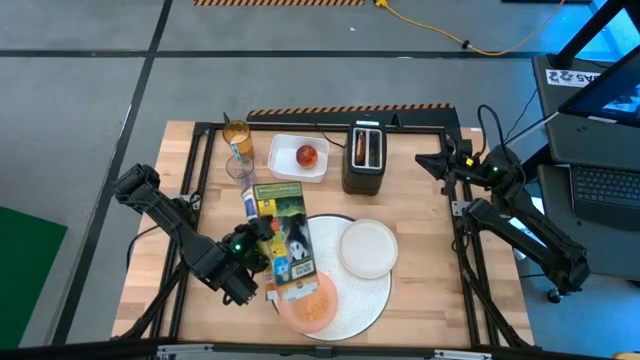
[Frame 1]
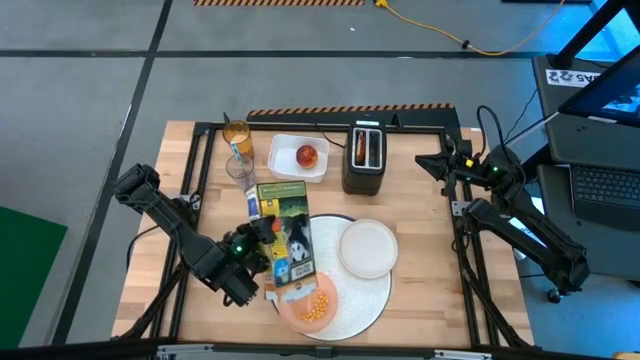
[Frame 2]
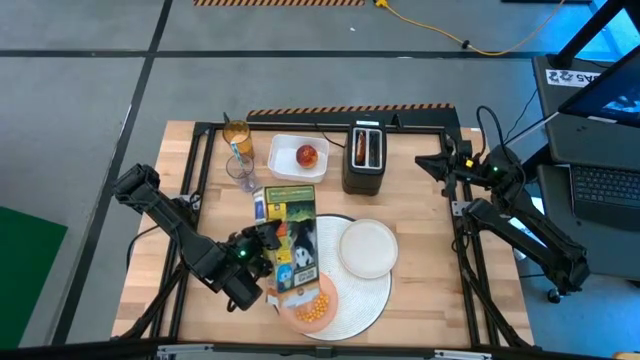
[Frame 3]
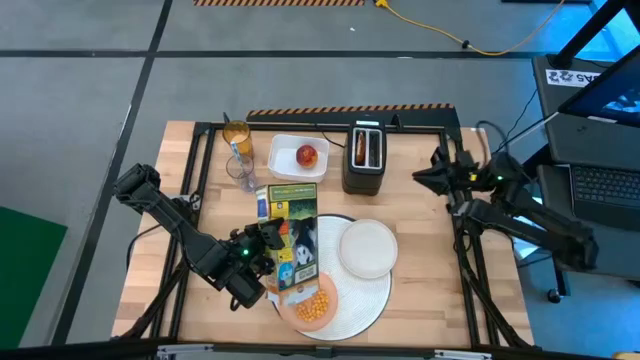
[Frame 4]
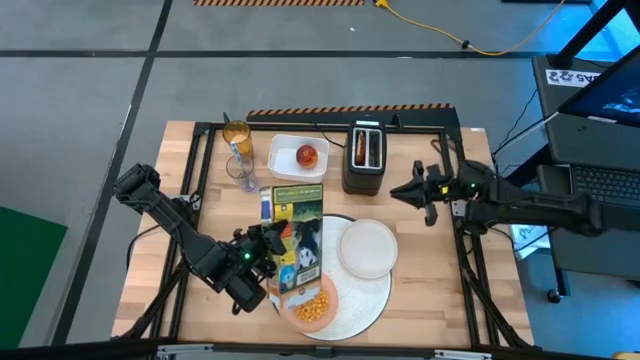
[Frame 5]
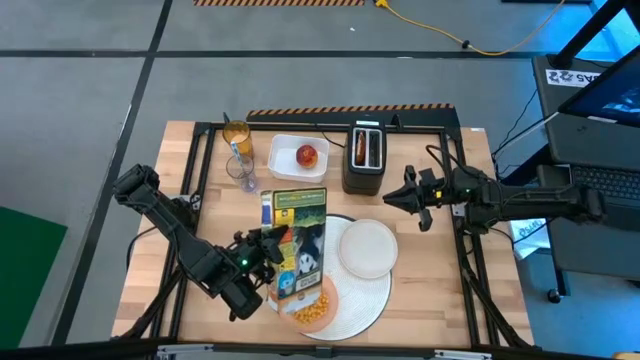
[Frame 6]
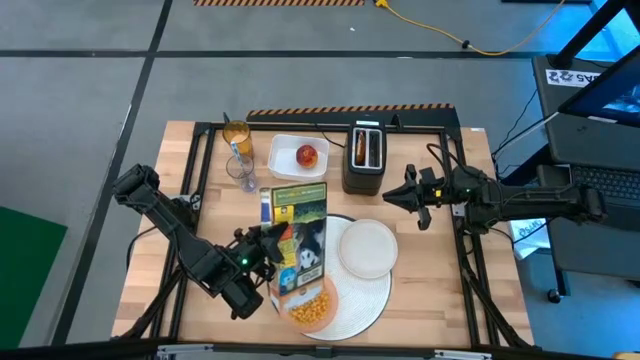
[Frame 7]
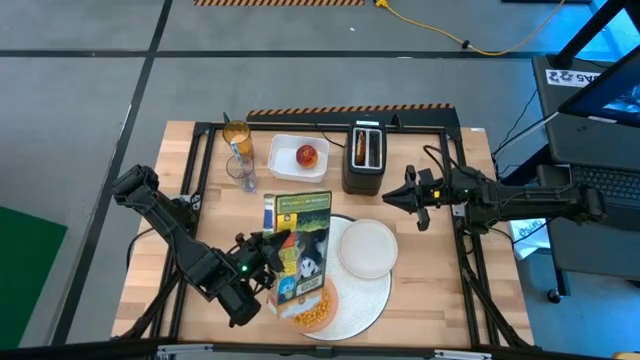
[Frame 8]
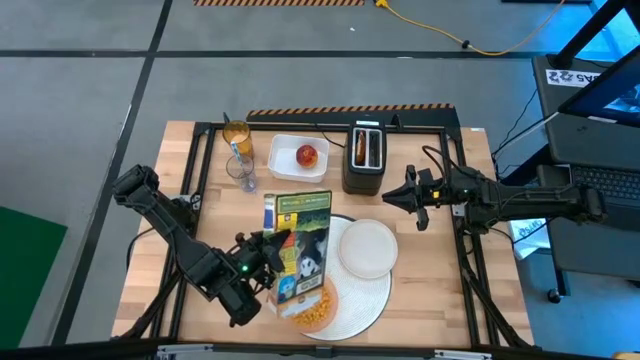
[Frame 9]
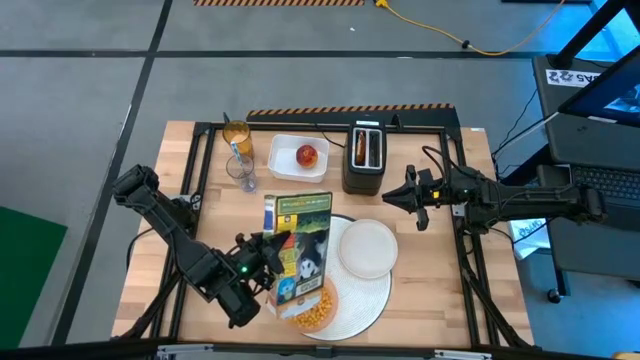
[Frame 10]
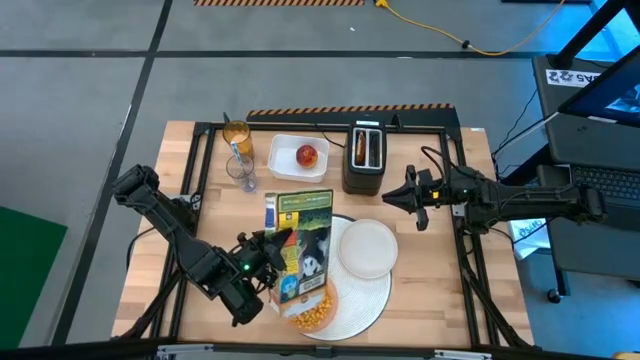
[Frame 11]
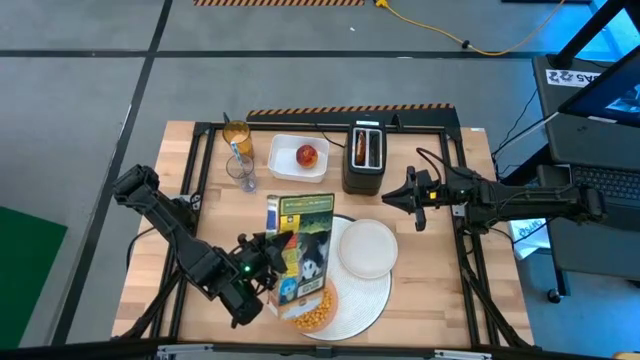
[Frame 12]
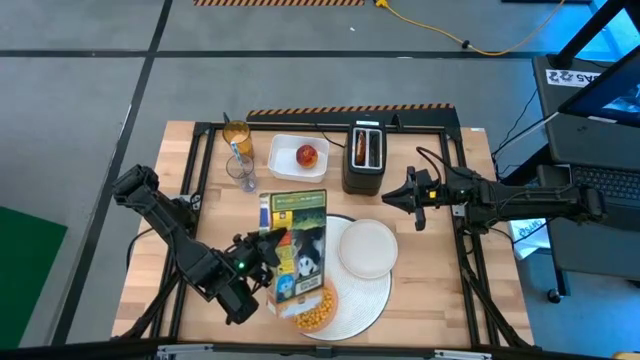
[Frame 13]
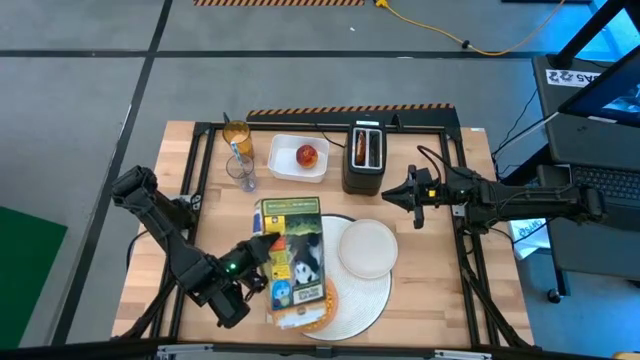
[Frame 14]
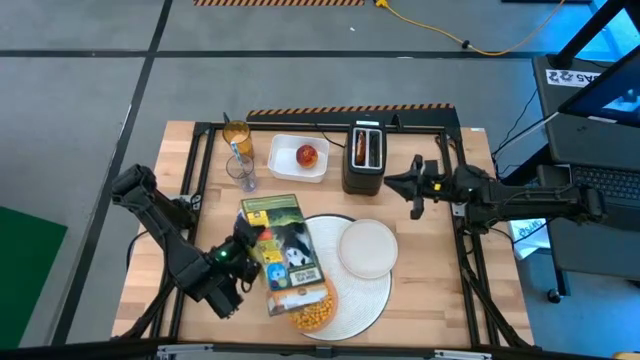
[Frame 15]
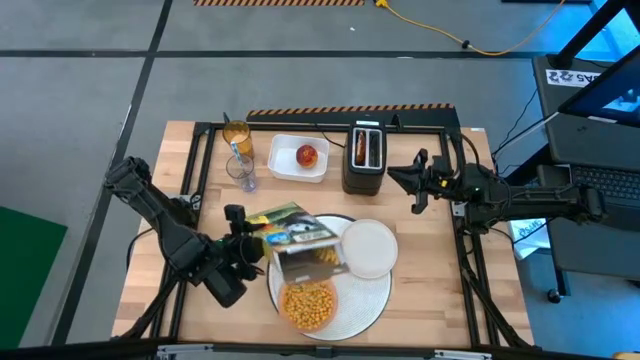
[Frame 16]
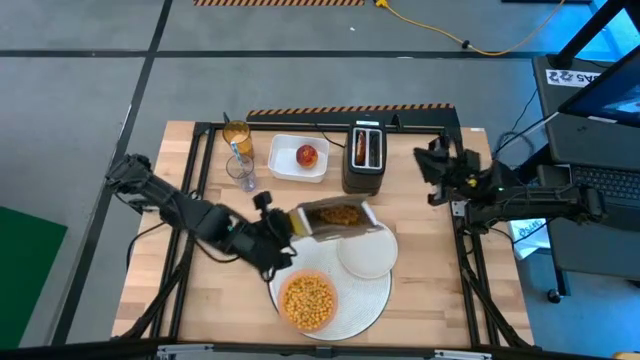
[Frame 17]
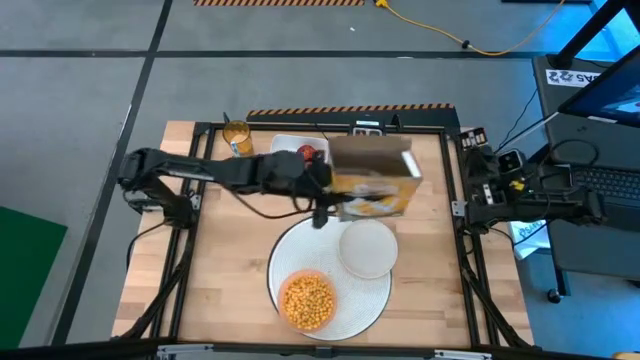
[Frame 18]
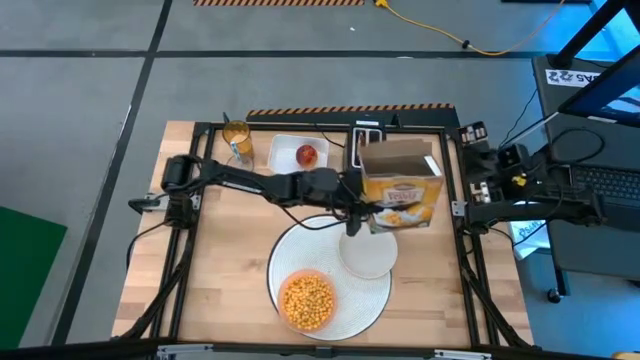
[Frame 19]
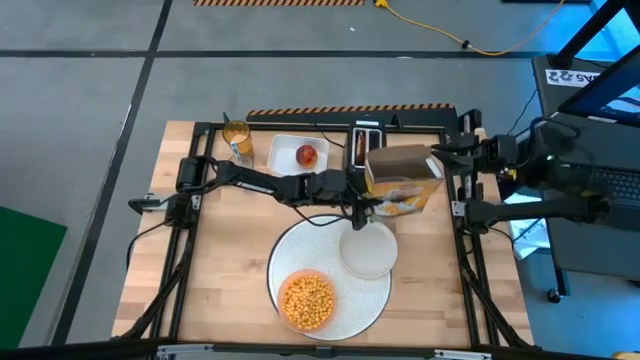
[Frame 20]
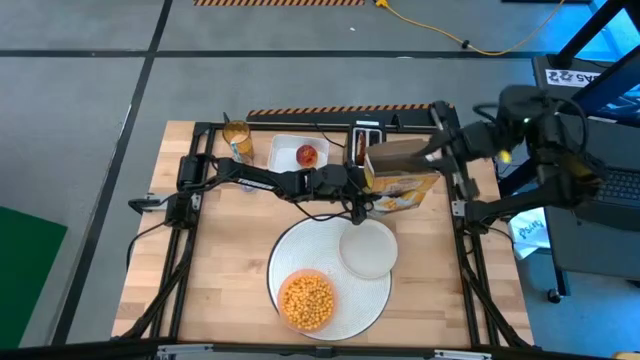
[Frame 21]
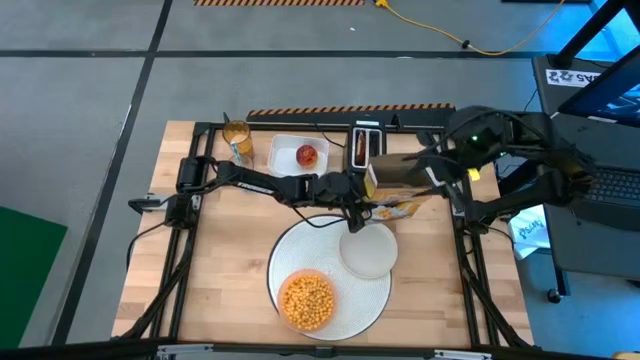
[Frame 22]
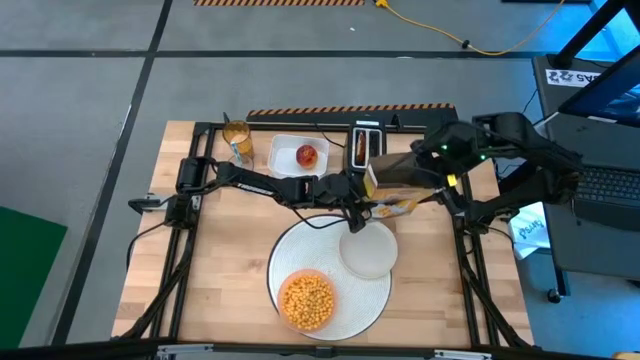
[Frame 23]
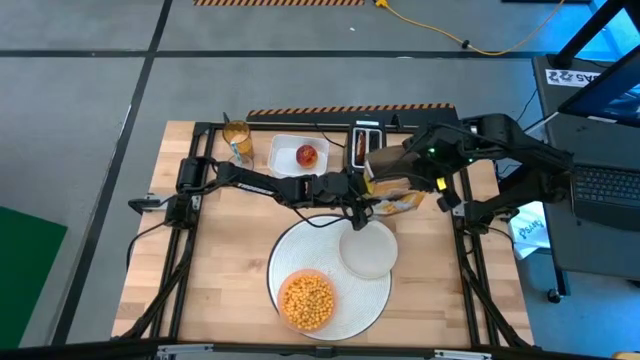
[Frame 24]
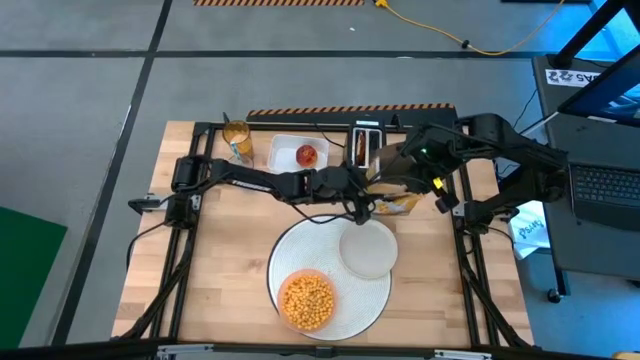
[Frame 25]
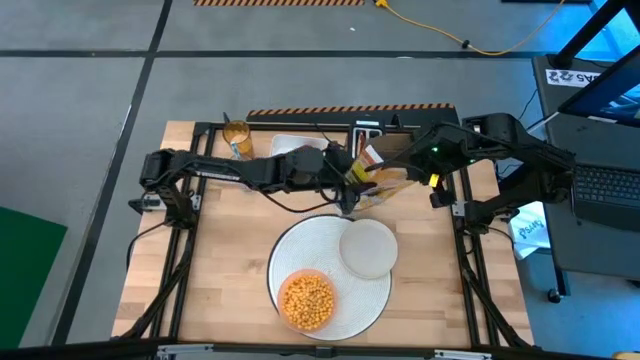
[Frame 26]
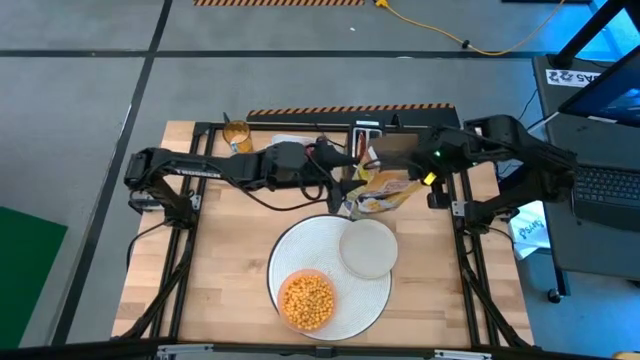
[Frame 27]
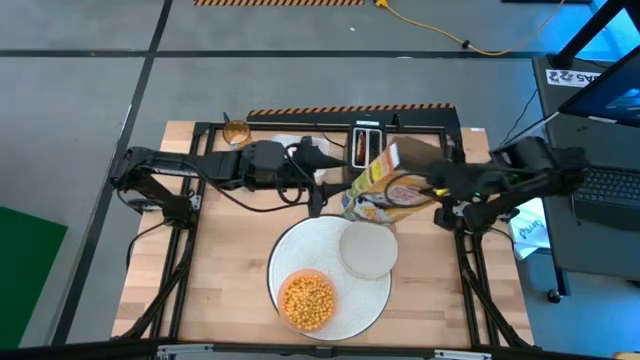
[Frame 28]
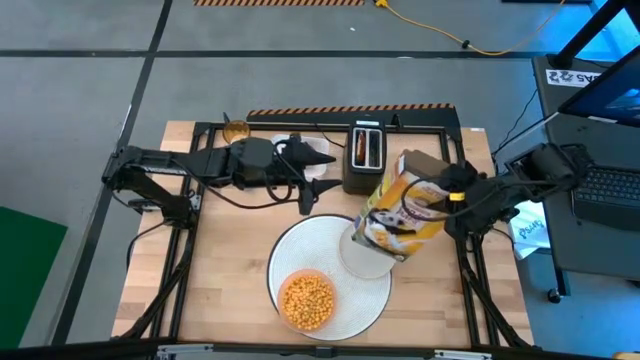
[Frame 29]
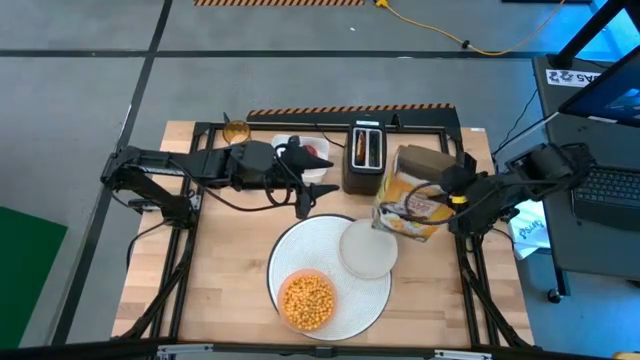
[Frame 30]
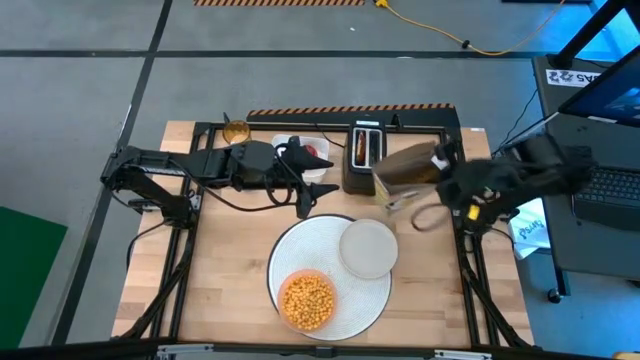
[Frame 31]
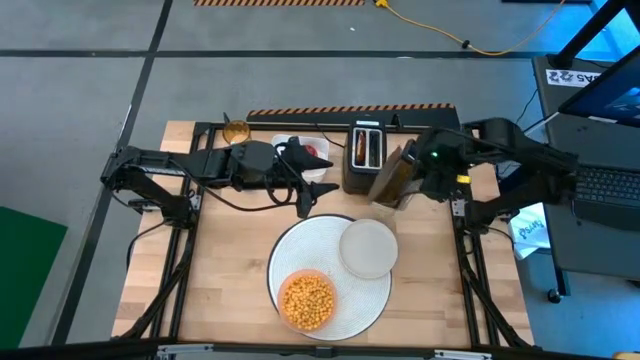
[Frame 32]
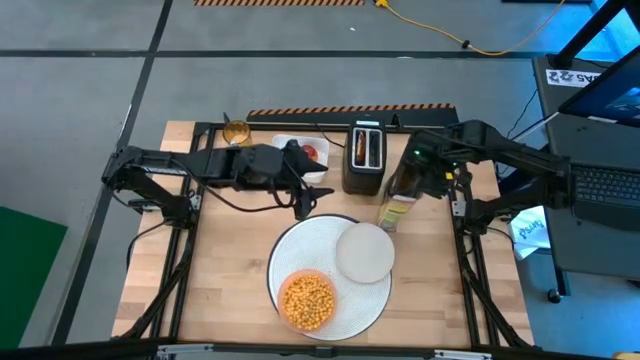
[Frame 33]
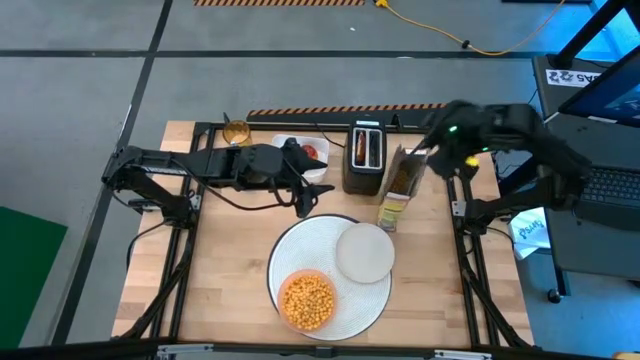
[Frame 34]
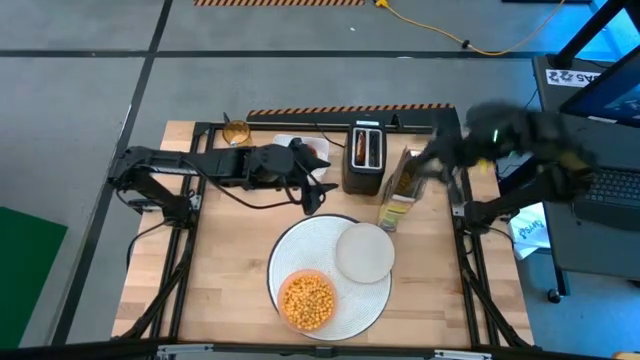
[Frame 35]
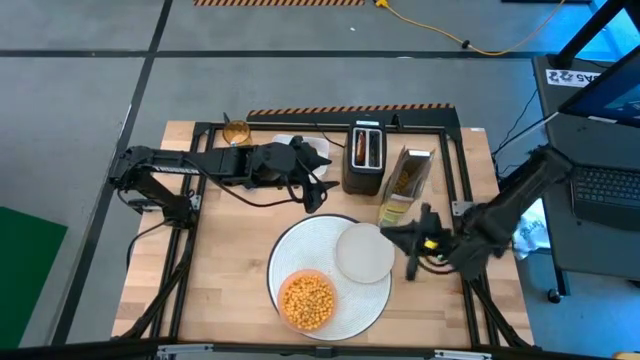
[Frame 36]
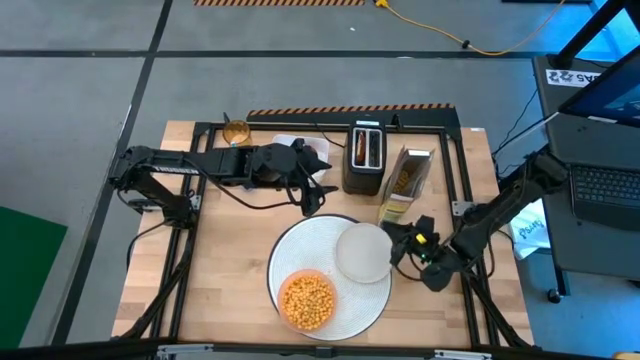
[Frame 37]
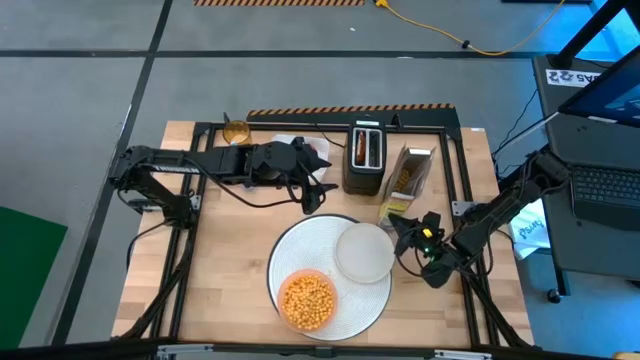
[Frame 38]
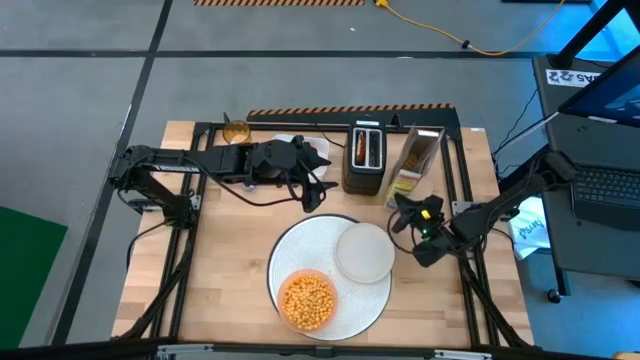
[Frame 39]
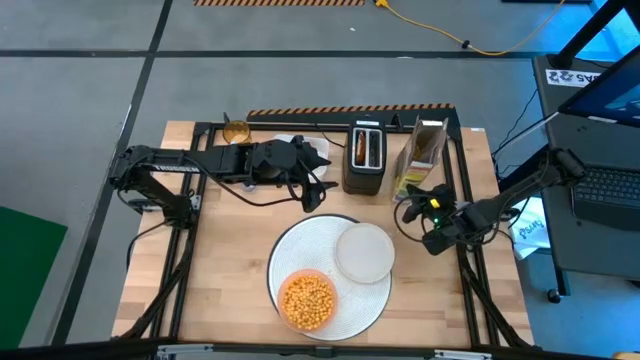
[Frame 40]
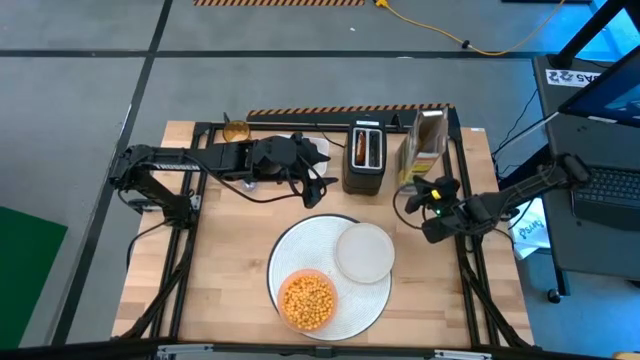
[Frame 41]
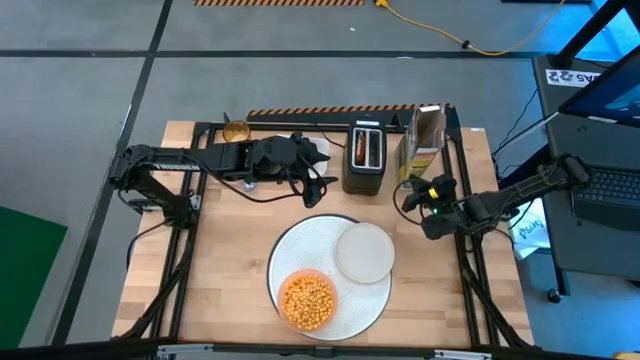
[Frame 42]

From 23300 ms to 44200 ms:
Task: Arrange a breakfast setting
Pour the cereal from the cereal box into the pink bowl
